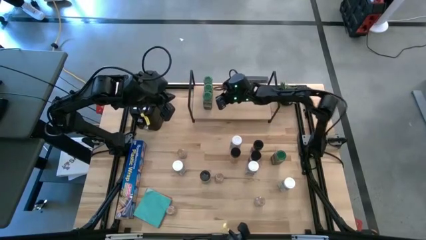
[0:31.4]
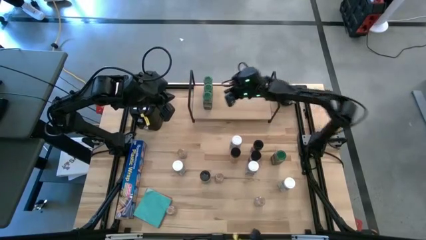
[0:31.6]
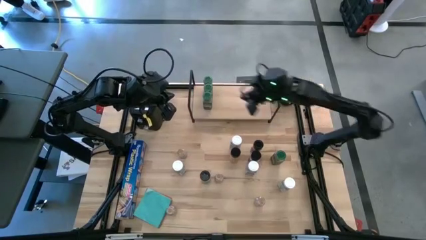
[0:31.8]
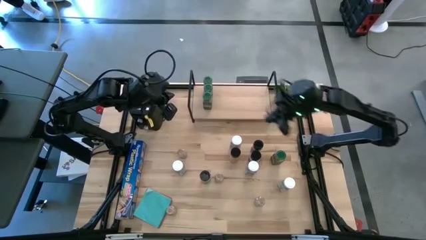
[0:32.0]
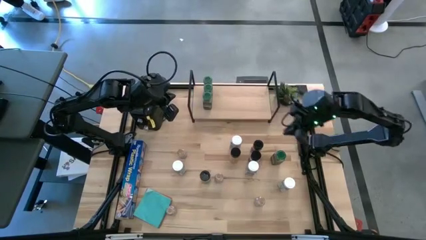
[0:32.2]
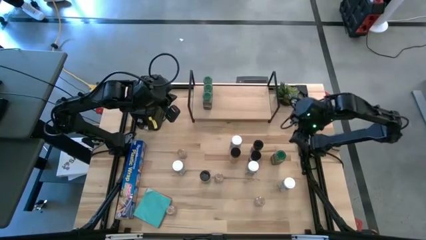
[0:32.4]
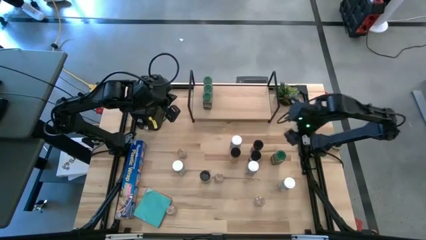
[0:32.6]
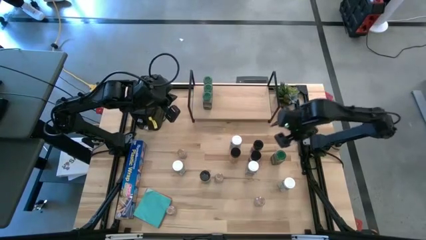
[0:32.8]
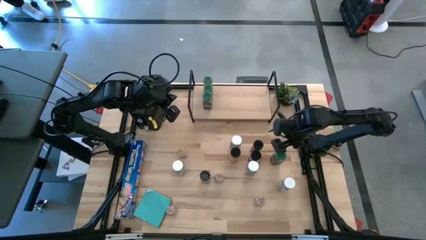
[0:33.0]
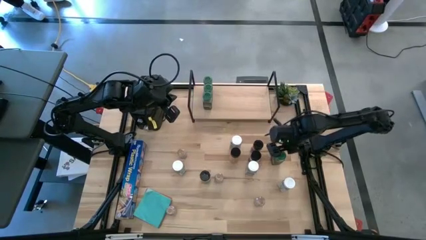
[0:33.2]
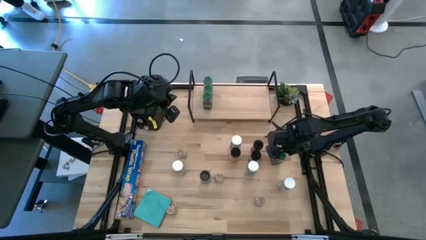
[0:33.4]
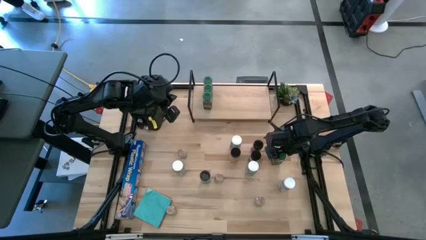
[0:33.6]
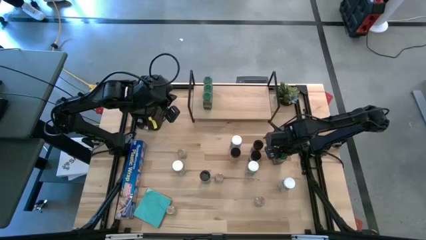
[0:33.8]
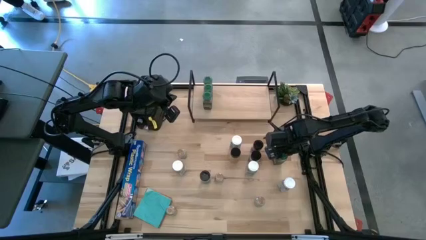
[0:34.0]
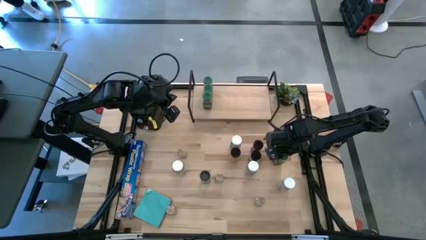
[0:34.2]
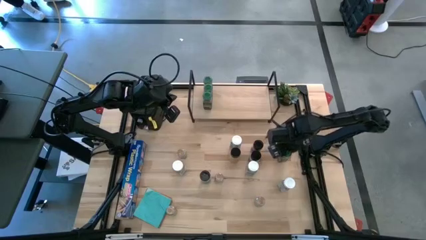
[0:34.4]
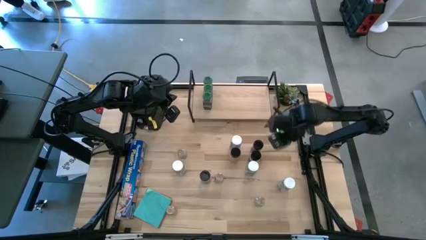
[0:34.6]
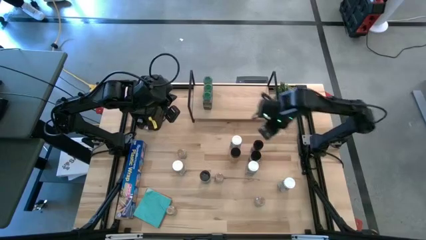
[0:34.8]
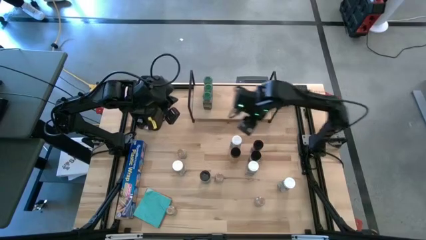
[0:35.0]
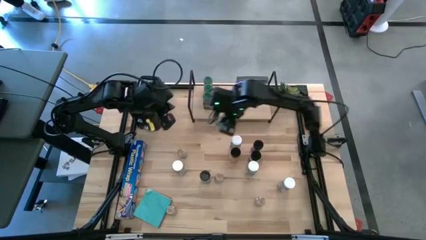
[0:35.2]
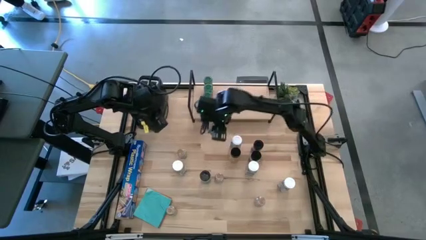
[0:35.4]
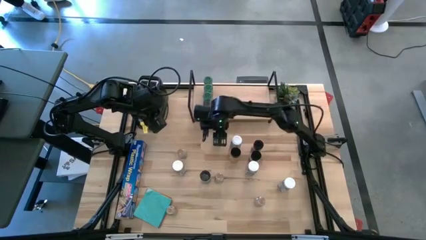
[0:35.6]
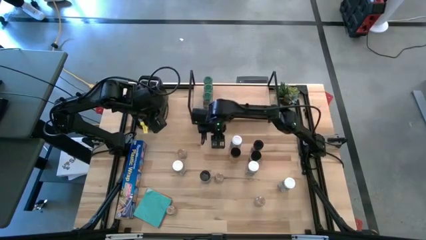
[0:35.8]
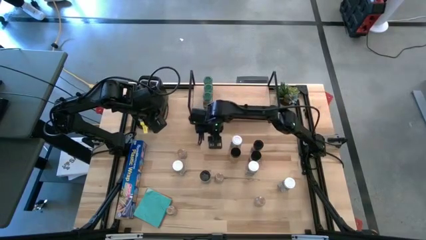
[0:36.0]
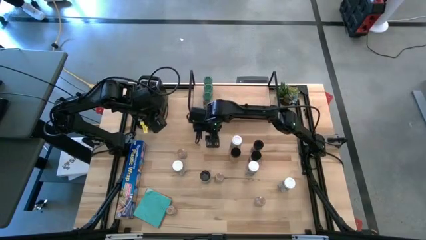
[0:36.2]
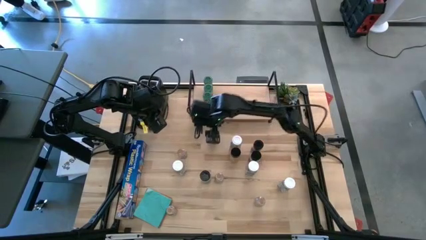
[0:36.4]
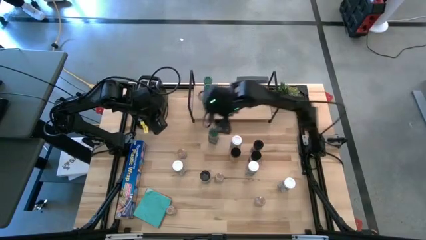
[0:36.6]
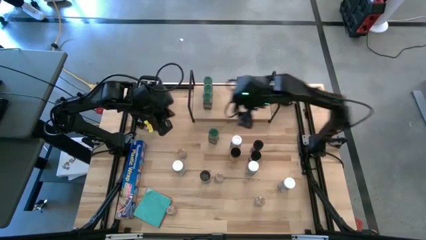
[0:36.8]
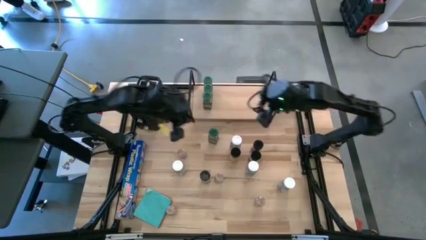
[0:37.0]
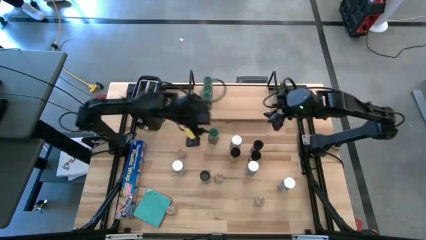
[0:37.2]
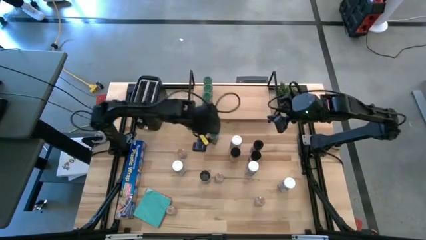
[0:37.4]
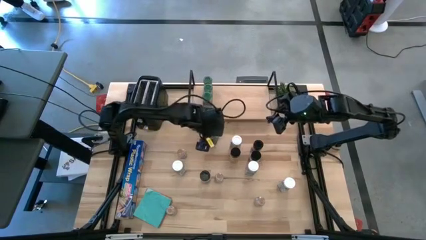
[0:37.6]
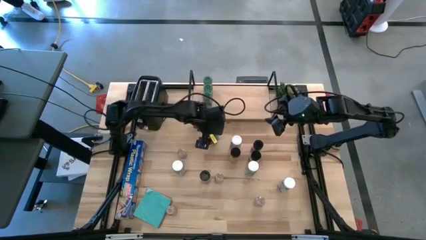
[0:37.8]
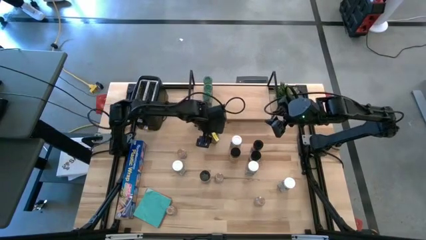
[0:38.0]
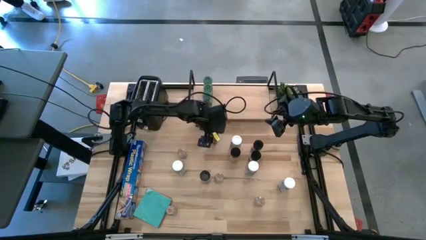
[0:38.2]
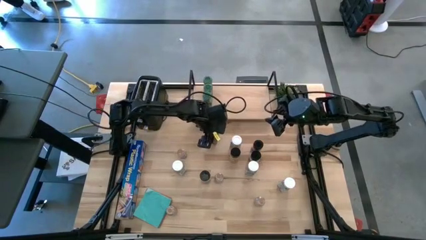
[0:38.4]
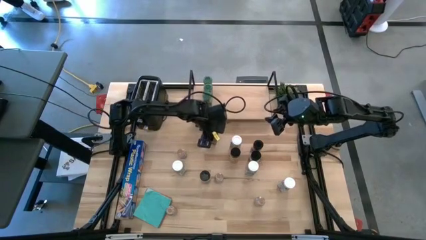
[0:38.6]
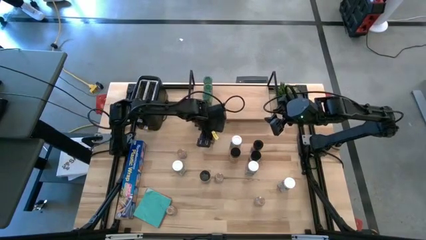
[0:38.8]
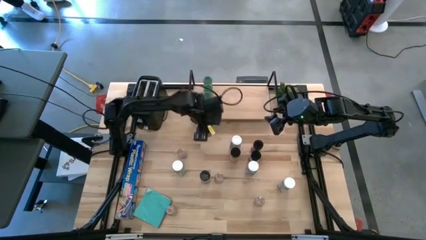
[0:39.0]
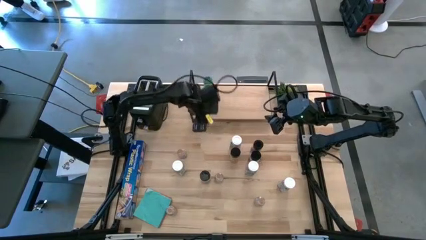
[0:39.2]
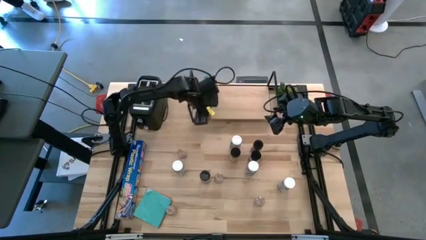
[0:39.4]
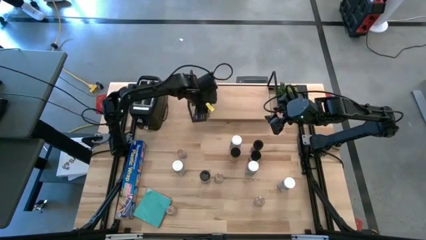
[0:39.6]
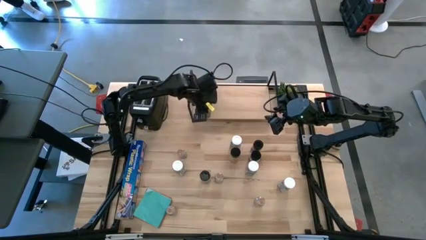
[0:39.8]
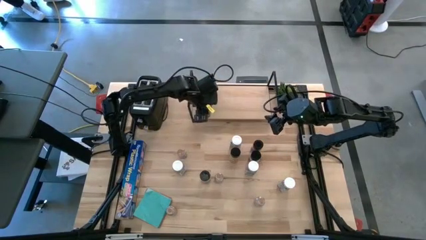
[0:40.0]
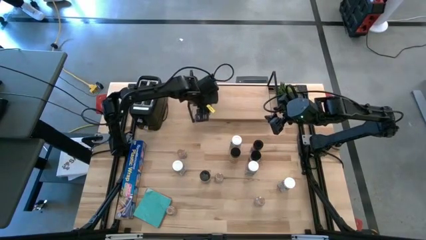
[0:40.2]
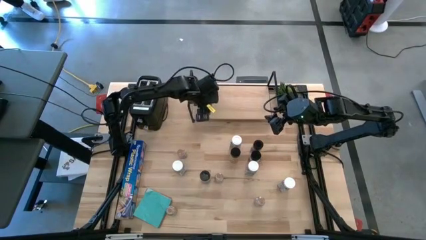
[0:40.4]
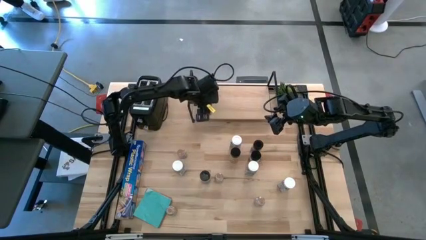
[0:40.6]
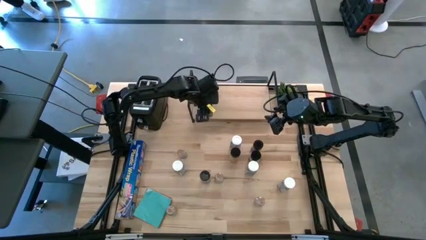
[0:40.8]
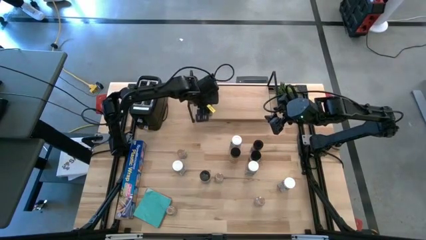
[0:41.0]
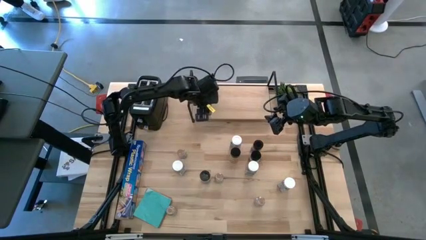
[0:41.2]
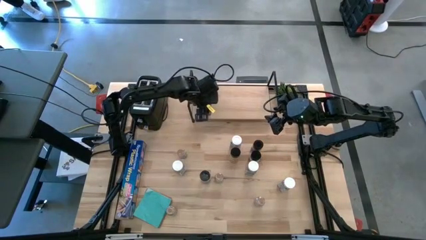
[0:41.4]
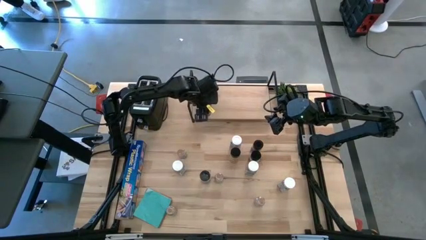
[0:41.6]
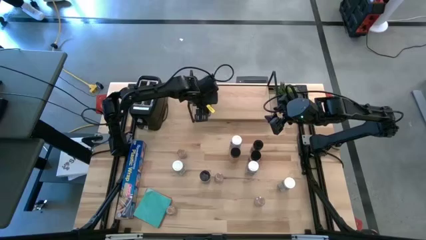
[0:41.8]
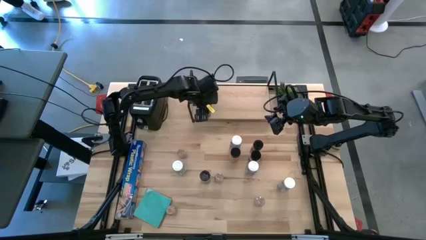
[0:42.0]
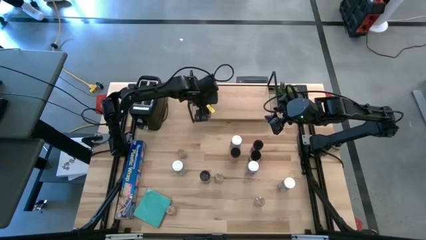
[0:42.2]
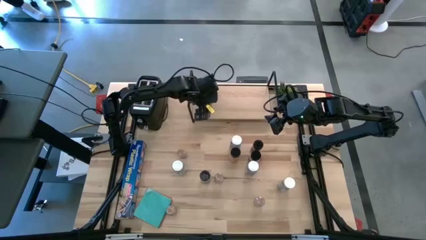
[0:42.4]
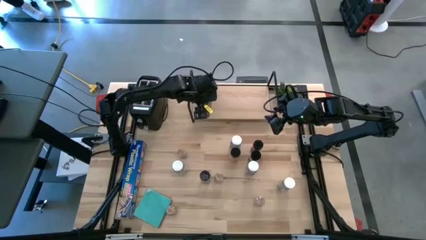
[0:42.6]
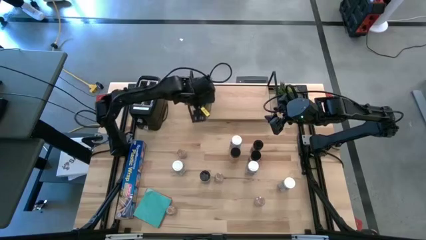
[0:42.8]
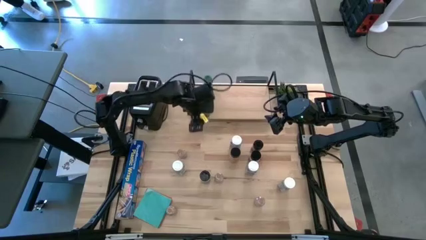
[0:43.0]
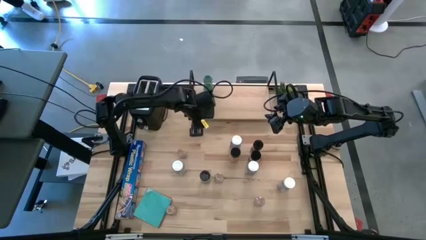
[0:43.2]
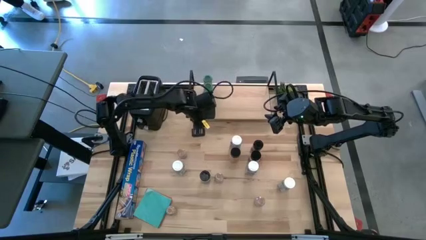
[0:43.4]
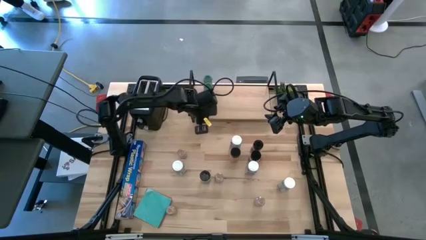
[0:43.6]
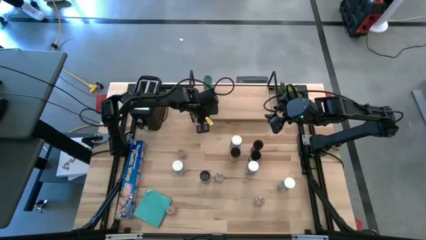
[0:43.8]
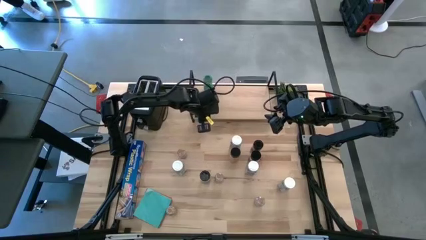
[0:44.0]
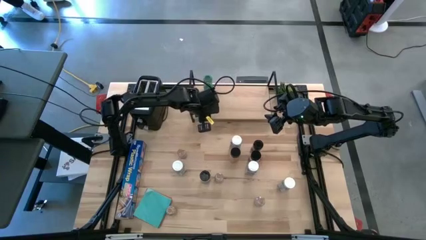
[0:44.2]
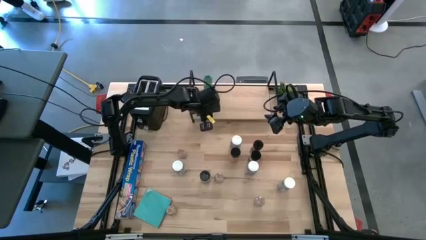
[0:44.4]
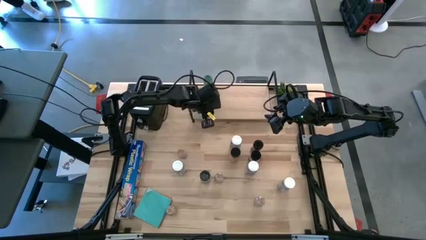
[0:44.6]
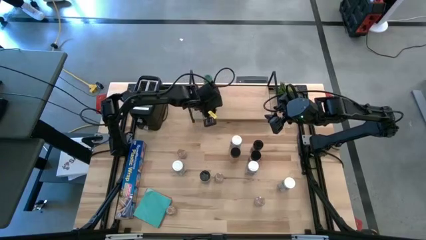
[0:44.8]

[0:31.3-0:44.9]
Task: Shelf spices
Put the green seasoning bottle on the shelf aligned with the other green seasoning bottles

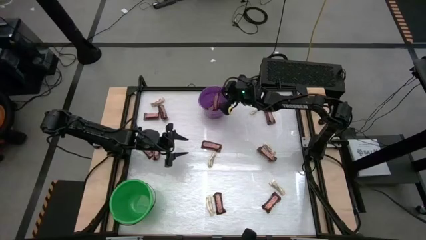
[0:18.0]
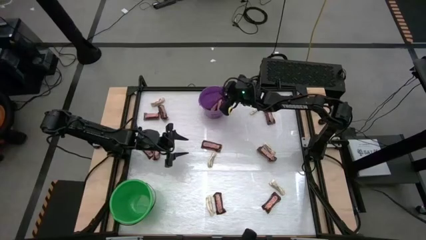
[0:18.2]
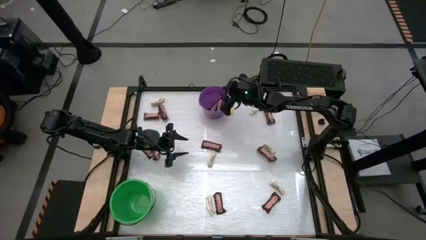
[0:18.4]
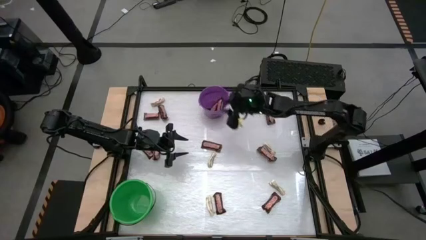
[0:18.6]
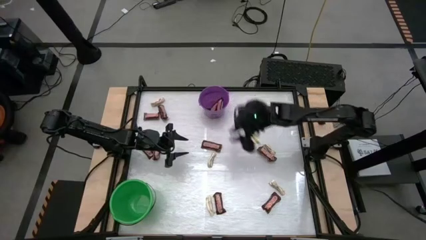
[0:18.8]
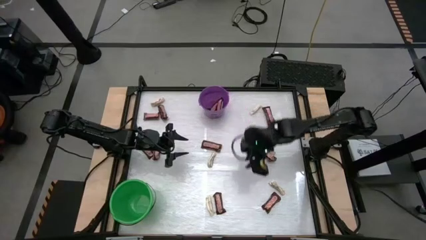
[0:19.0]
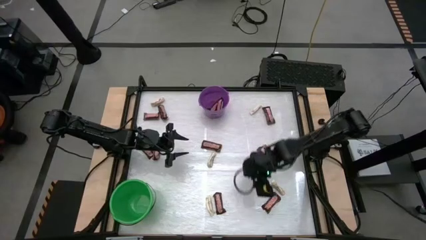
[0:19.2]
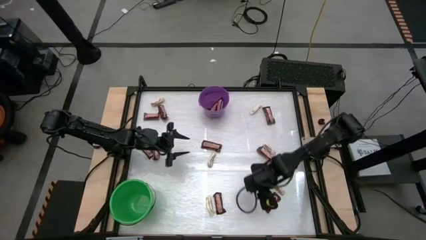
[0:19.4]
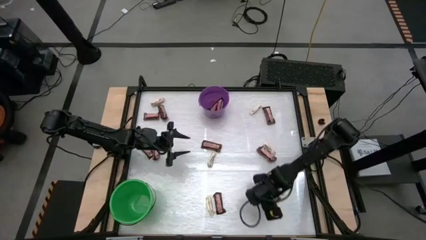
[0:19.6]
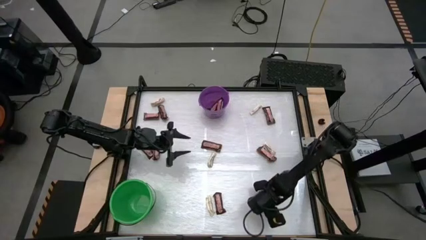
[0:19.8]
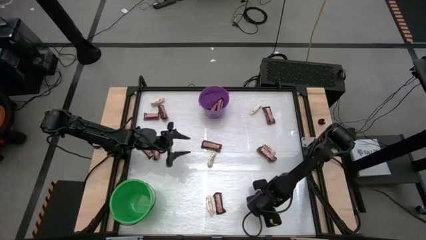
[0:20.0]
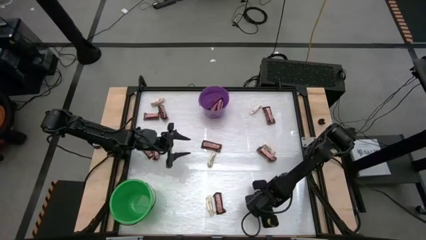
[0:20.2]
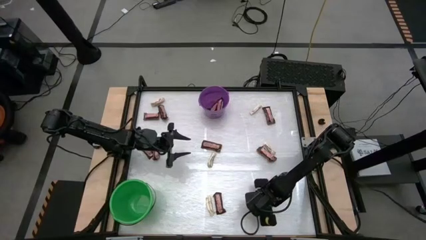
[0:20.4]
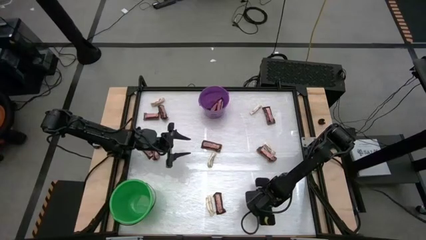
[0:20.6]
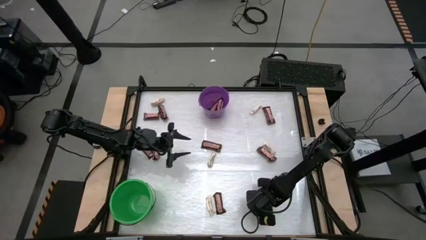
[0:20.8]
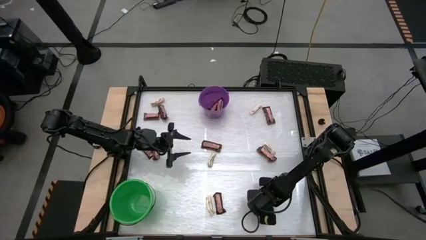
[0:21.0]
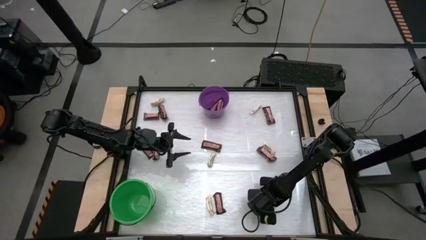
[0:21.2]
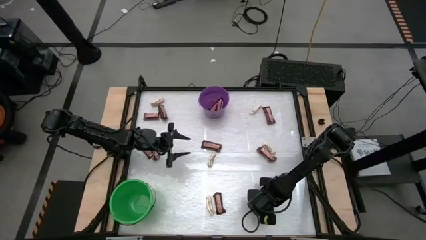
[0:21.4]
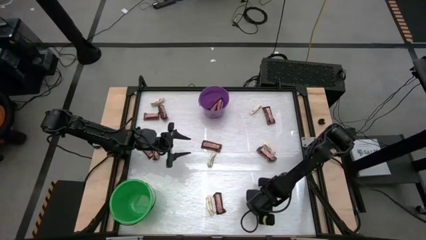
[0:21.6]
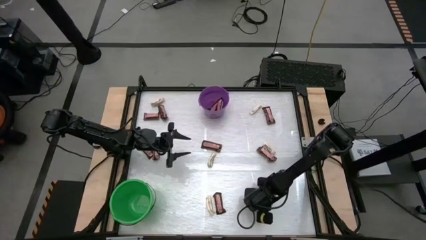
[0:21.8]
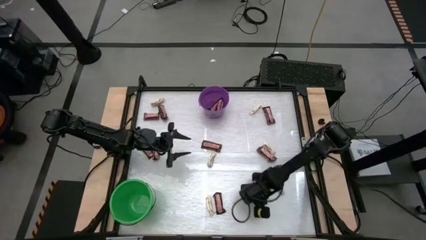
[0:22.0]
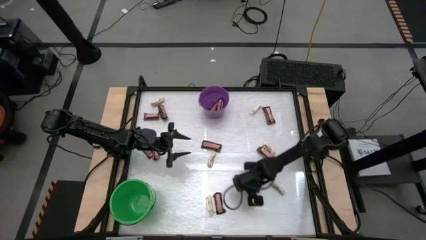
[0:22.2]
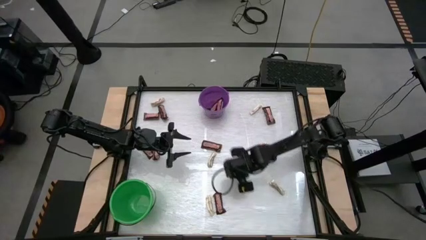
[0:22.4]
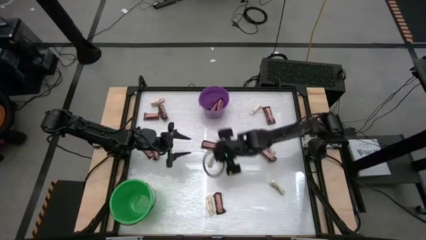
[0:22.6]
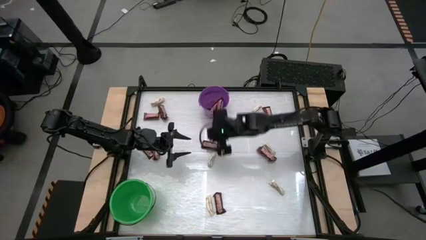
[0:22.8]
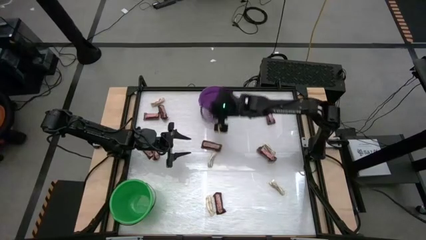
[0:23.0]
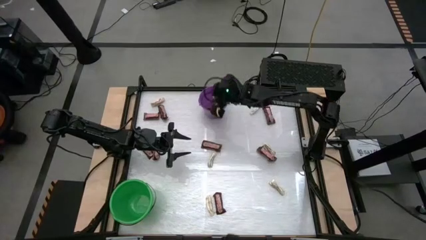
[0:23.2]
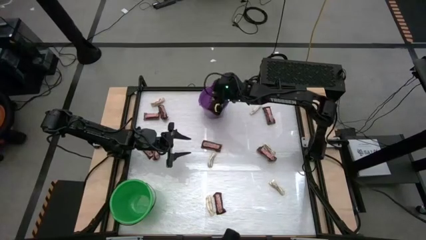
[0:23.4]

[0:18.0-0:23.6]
Task: Sort candy by brand, put in halloween buckets
Put the brown chocolate into the purple bucket
